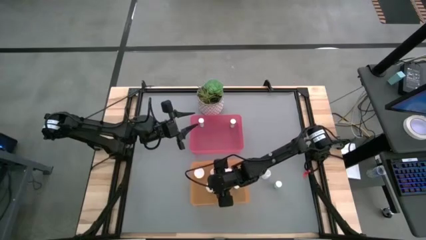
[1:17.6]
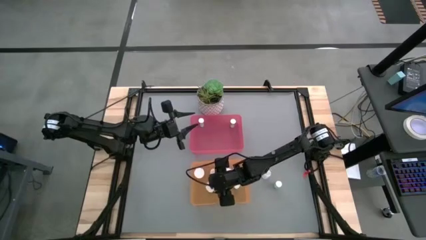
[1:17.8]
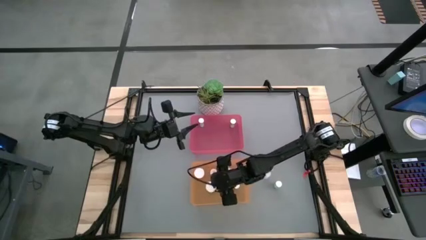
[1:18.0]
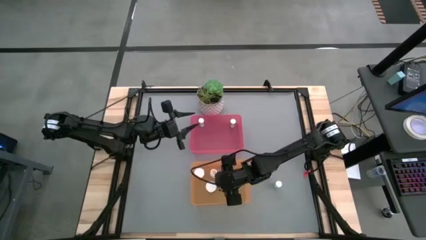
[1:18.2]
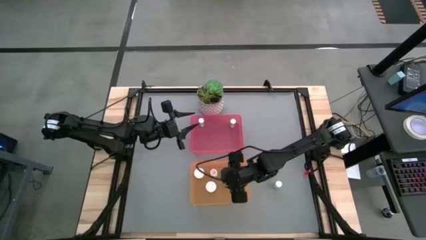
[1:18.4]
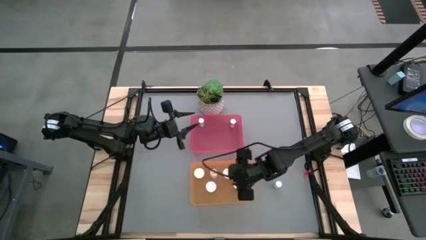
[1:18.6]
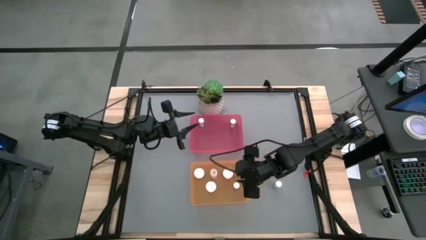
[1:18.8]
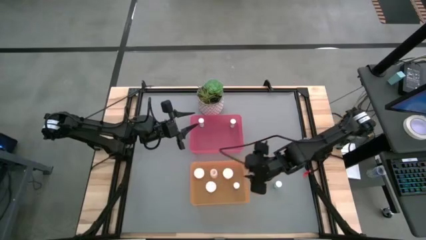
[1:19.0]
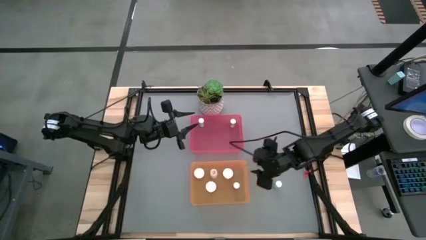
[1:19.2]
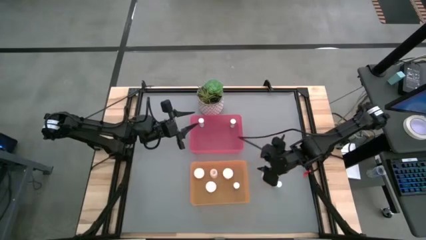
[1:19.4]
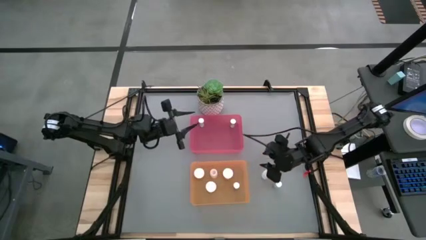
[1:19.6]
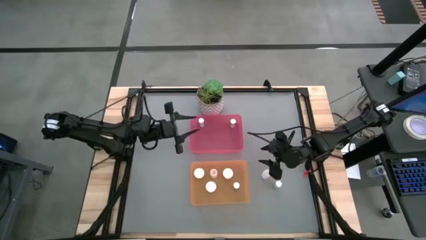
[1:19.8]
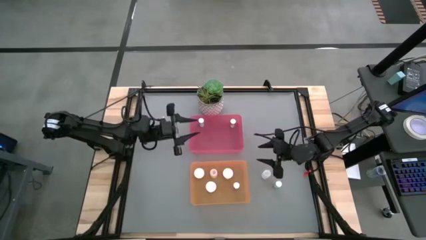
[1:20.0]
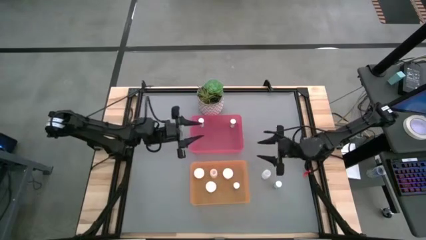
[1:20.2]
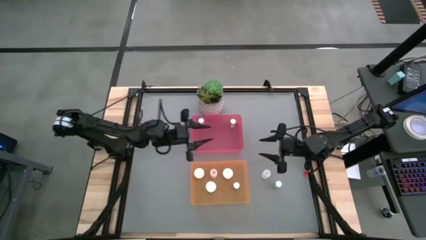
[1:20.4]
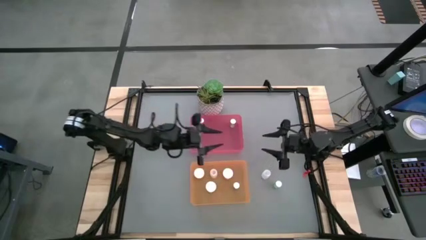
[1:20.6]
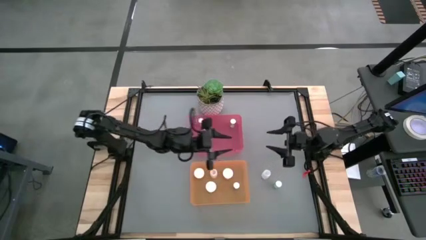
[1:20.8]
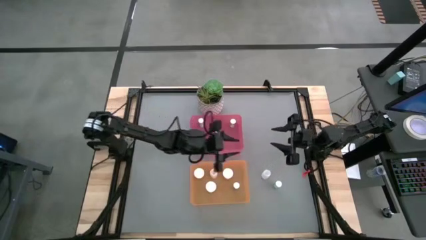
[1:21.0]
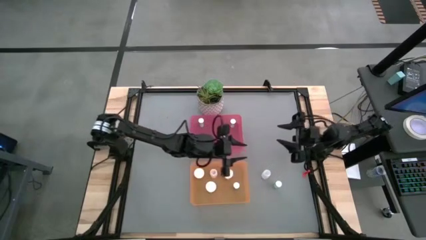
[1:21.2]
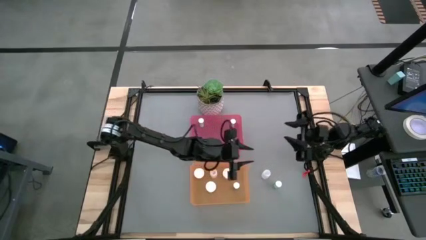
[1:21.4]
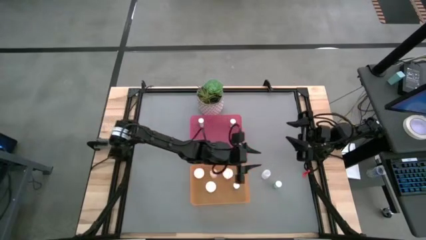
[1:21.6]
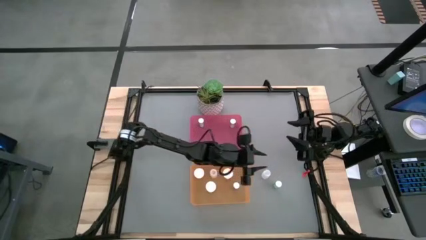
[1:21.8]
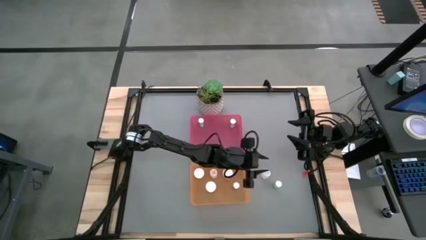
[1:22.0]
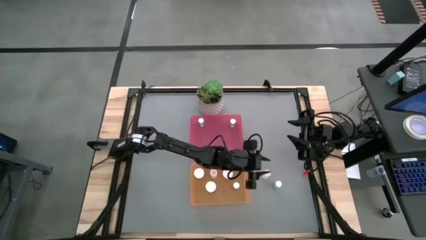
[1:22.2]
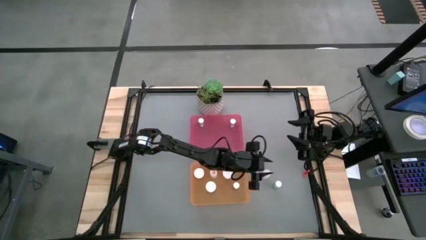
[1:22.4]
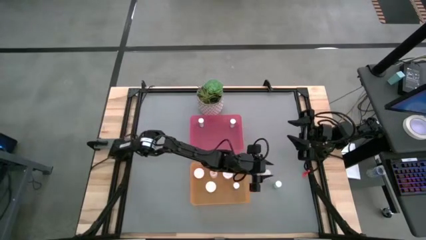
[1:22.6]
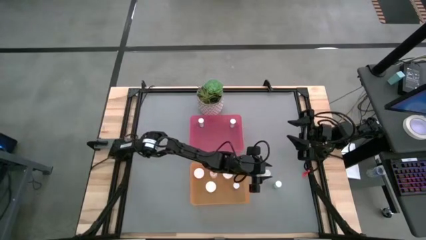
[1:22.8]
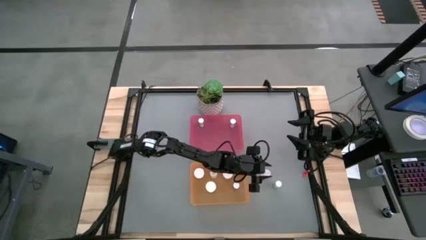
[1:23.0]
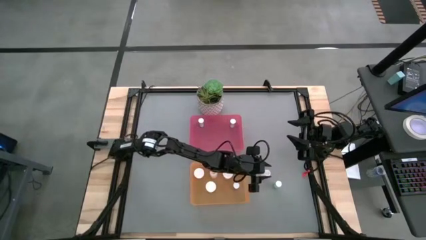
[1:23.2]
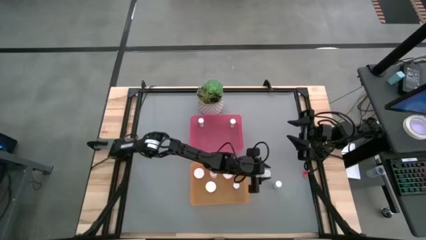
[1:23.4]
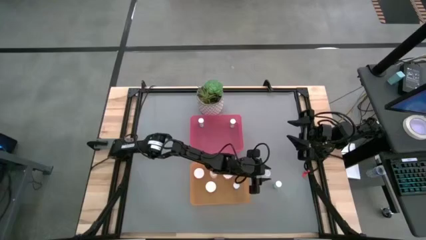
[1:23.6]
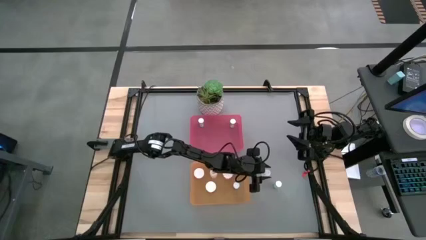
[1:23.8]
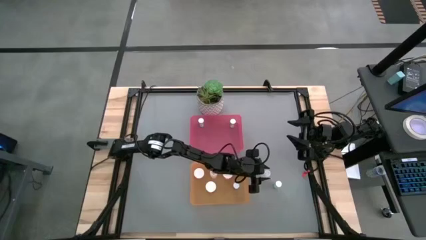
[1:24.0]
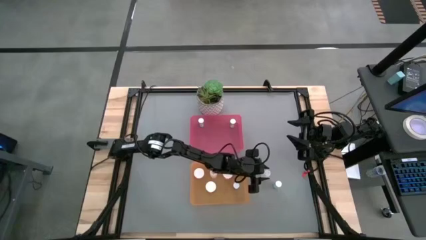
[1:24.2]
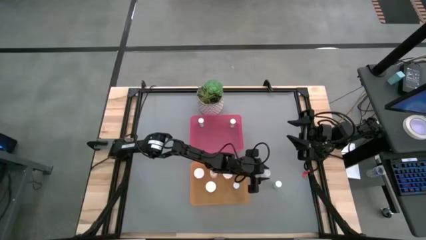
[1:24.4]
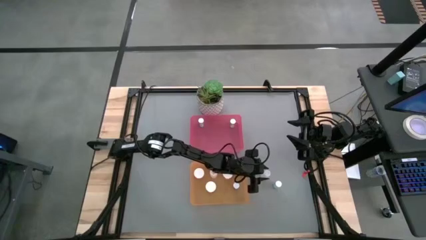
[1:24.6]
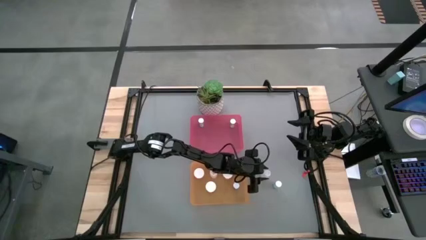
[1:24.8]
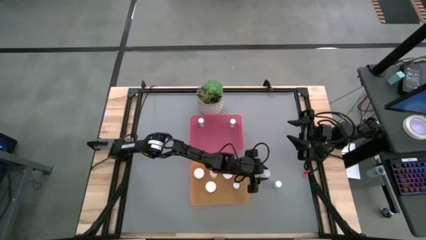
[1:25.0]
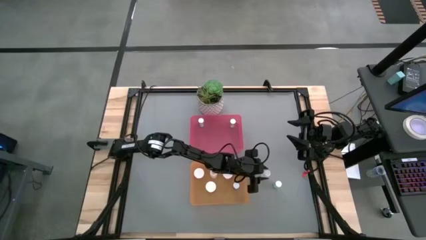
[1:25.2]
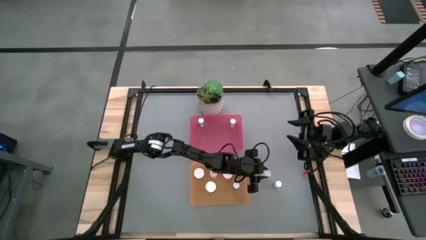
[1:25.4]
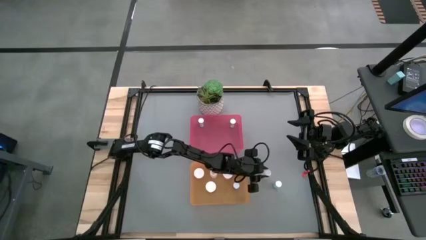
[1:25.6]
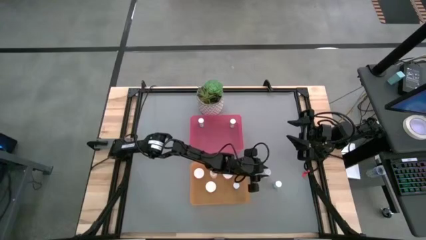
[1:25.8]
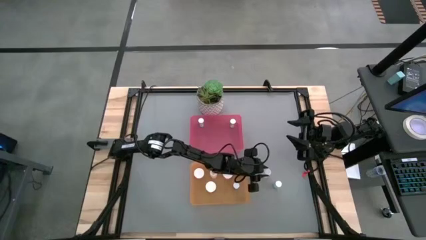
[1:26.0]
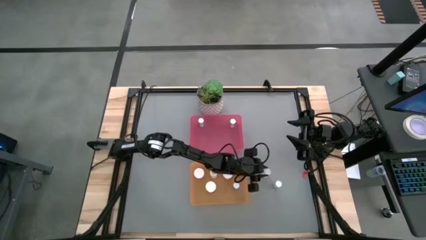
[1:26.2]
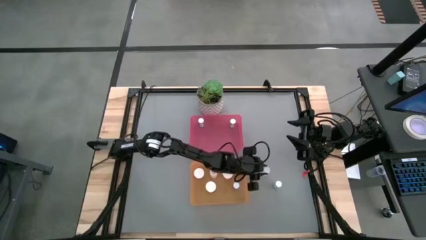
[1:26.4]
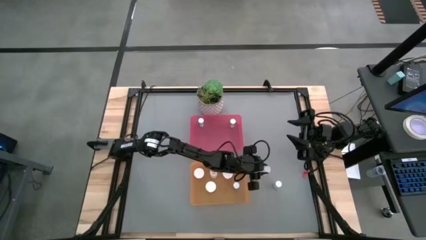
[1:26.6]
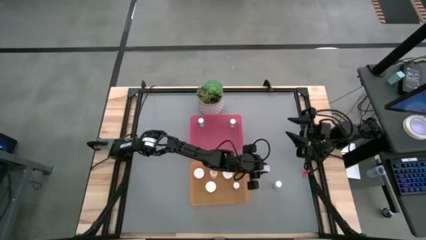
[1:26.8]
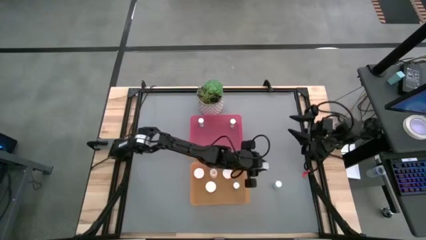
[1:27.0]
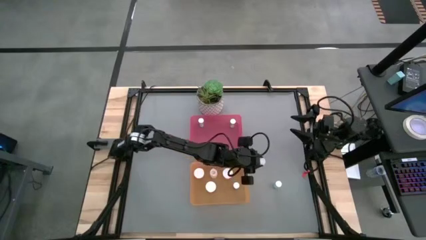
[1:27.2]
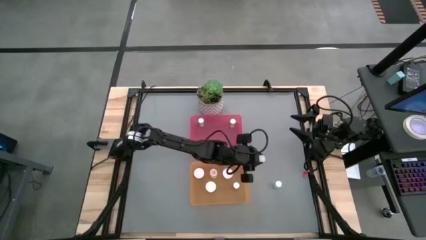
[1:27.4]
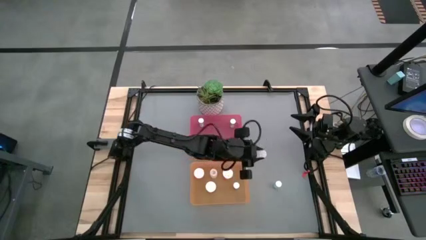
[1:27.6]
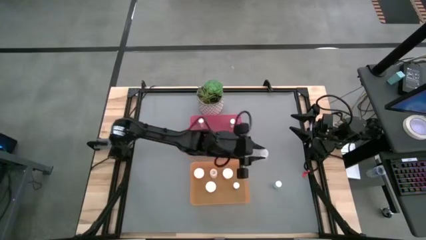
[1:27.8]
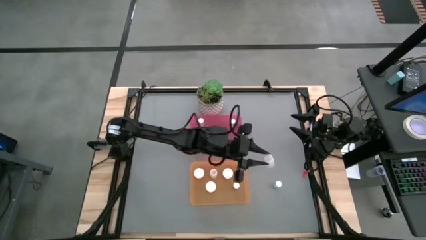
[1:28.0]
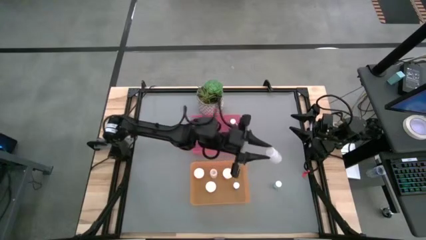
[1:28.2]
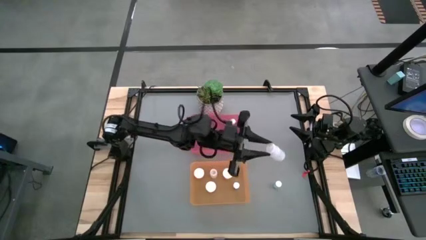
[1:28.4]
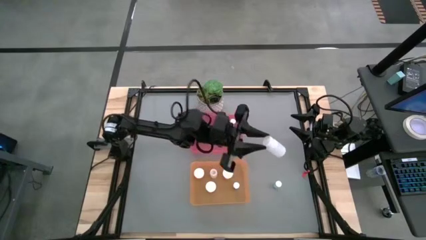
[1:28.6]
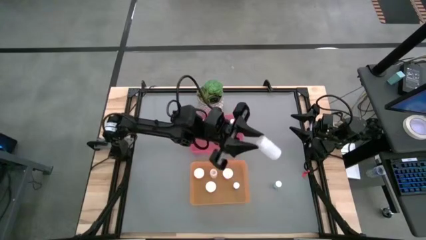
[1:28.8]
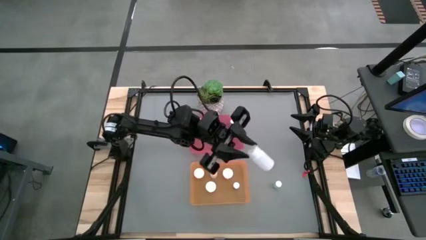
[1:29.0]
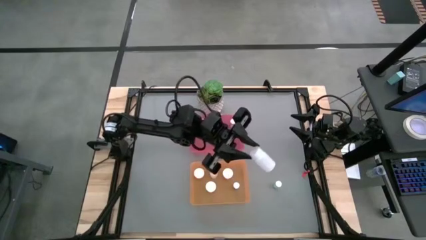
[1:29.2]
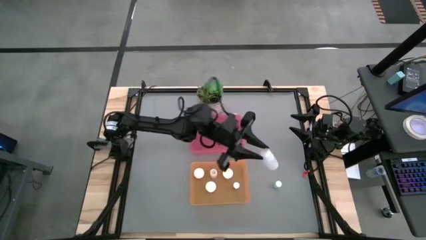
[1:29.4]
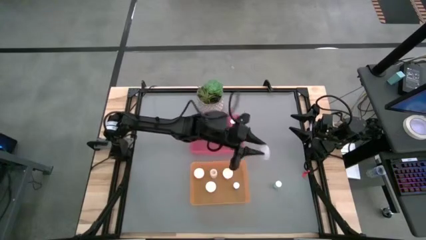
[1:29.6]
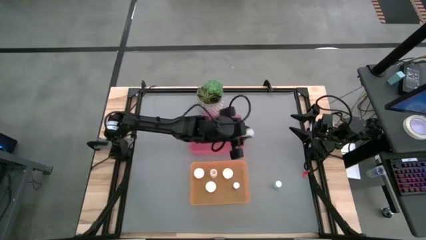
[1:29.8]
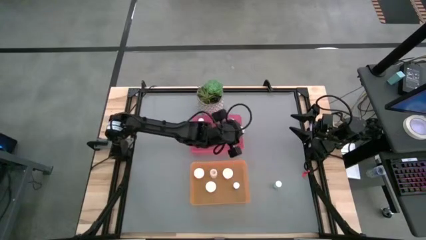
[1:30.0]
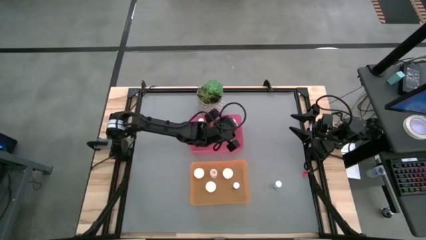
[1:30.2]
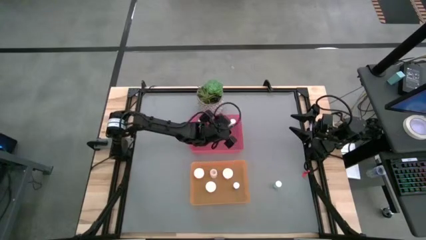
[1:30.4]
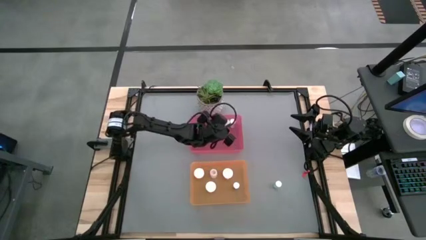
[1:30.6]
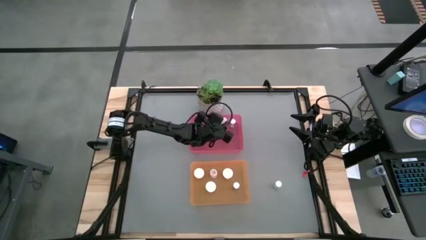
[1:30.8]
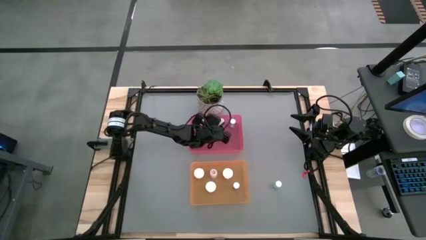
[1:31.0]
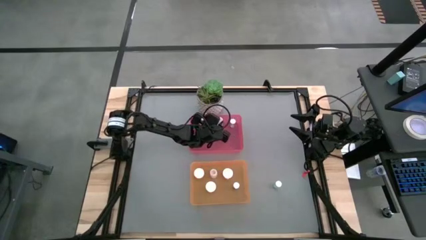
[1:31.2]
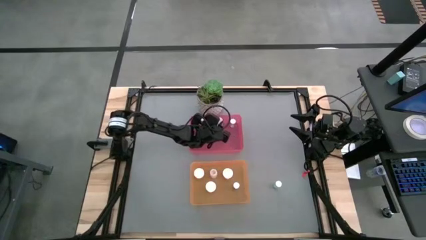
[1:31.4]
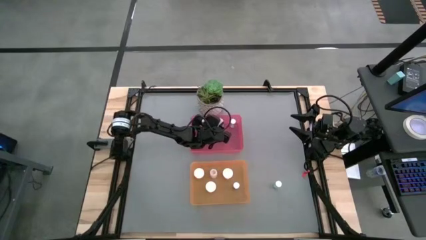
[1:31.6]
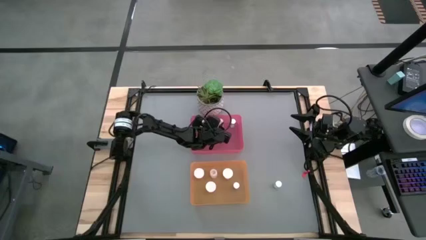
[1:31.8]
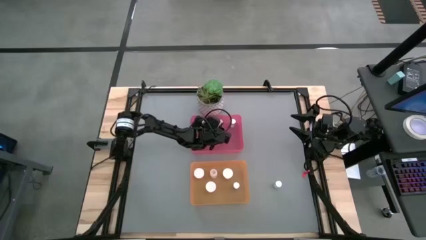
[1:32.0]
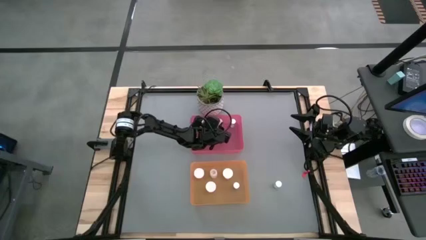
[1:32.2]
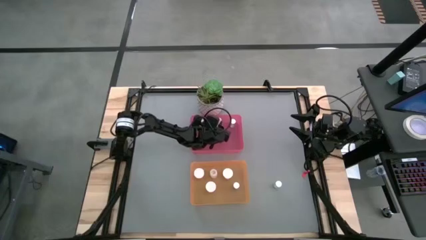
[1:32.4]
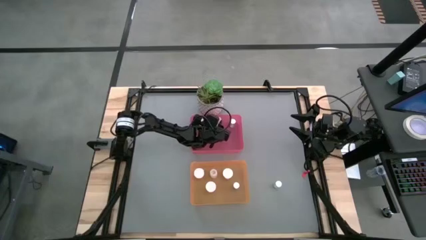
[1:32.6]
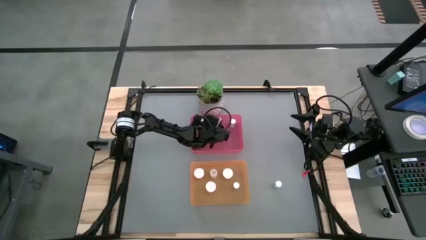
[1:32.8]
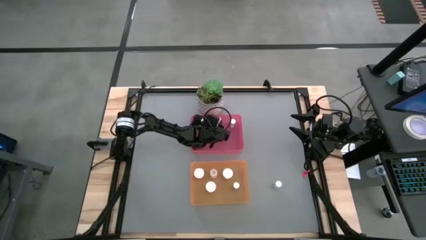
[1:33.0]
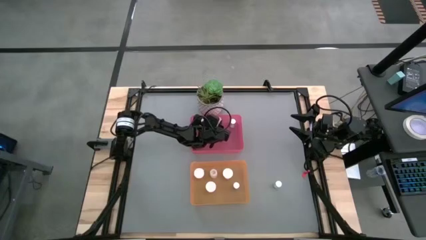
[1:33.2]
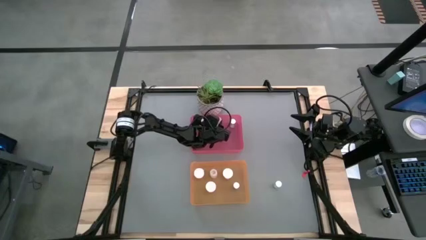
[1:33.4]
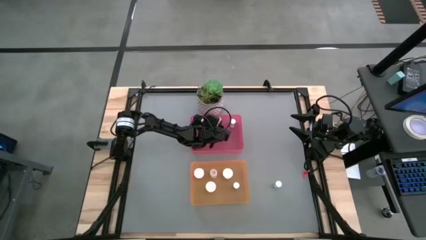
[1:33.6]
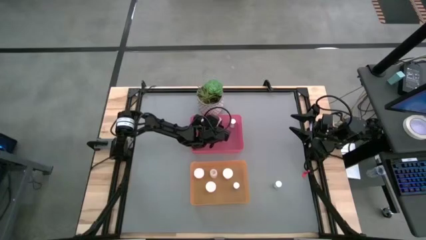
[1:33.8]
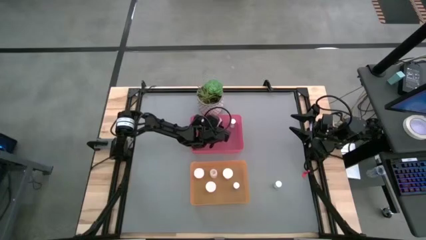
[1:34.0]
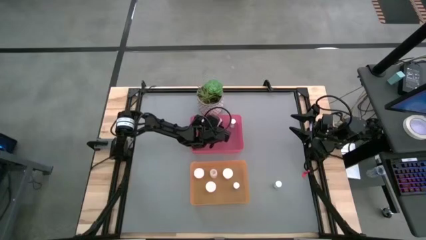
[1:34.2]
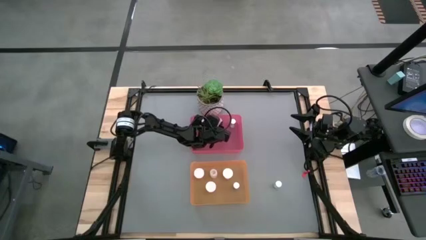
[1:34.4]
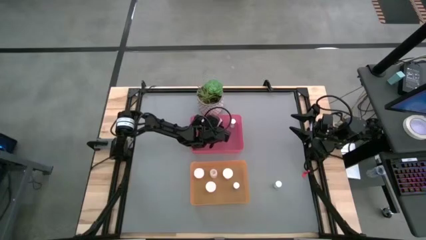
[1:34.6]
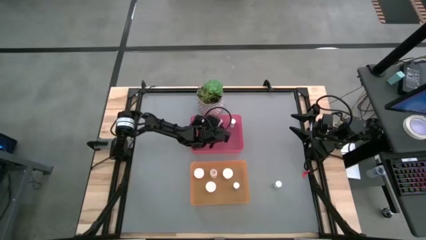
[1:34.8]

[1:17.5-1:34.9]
Task: Pick and place medicine bottles into bin by pill shape (circle, oval)
Put the white tablet bottle into the pink bin
